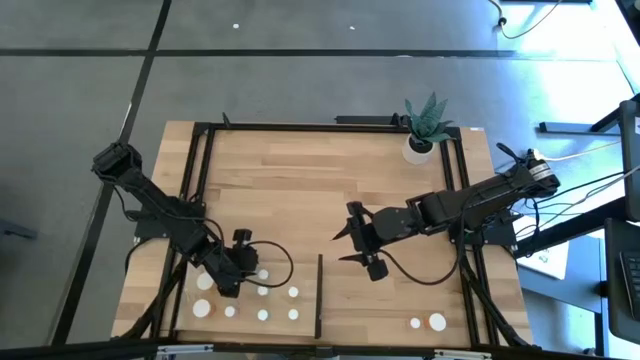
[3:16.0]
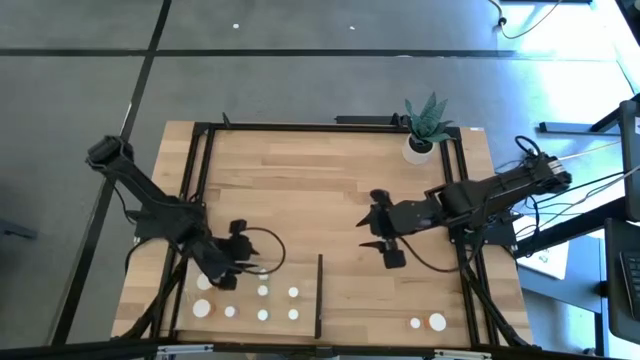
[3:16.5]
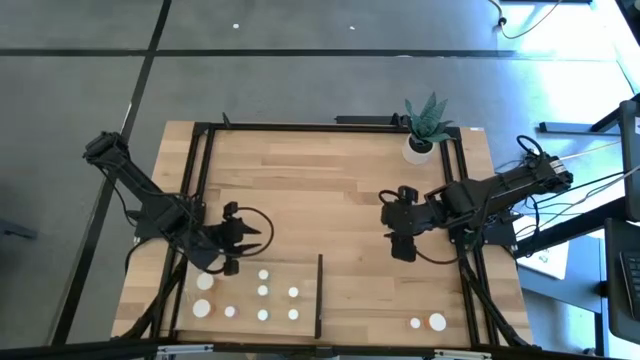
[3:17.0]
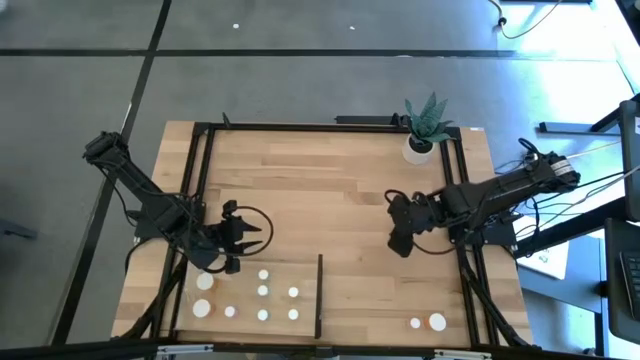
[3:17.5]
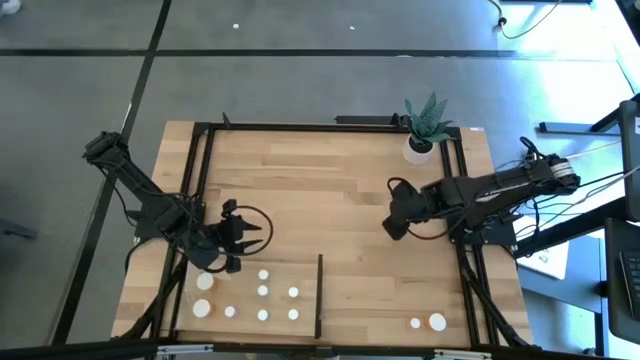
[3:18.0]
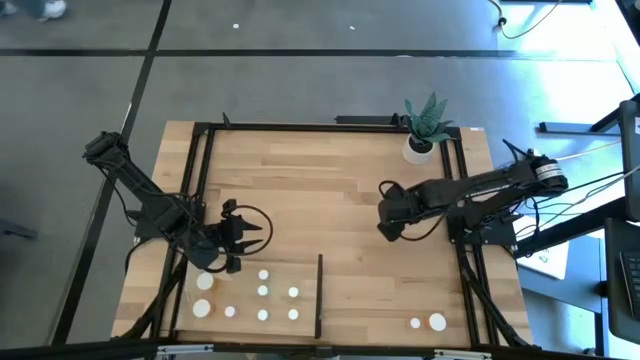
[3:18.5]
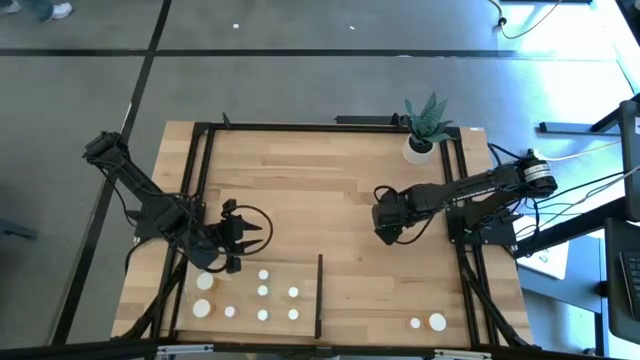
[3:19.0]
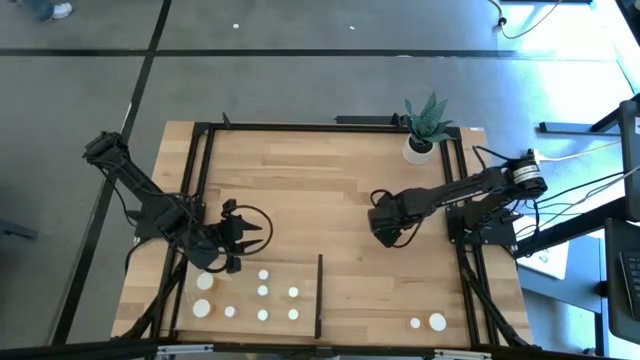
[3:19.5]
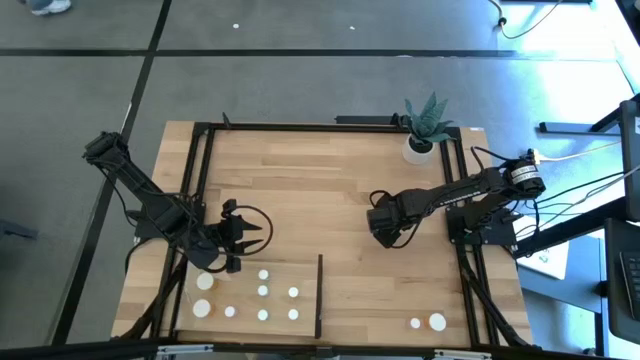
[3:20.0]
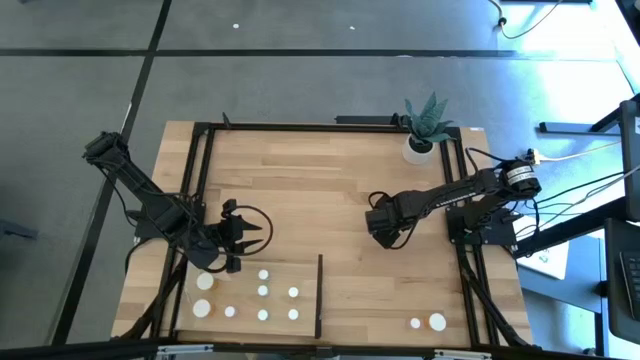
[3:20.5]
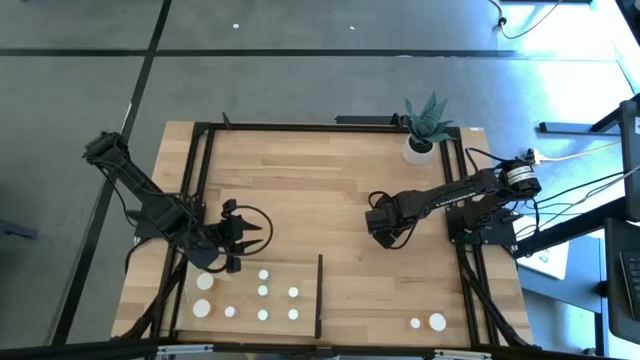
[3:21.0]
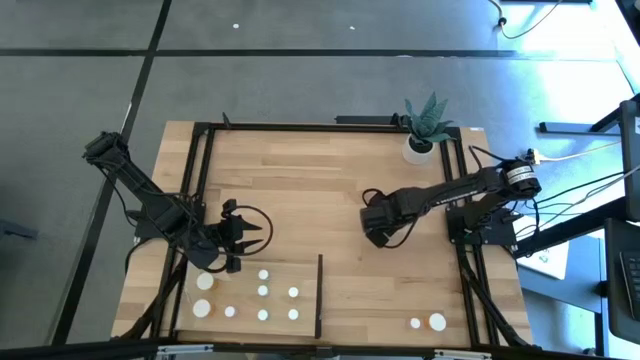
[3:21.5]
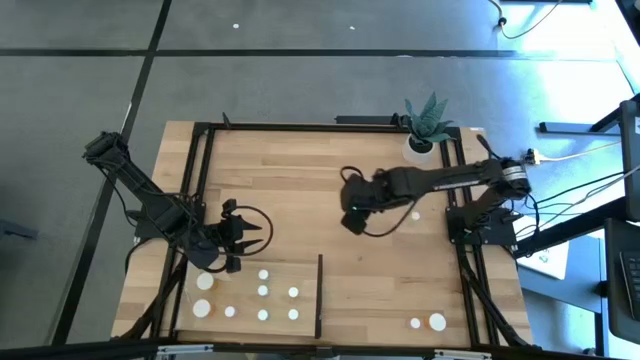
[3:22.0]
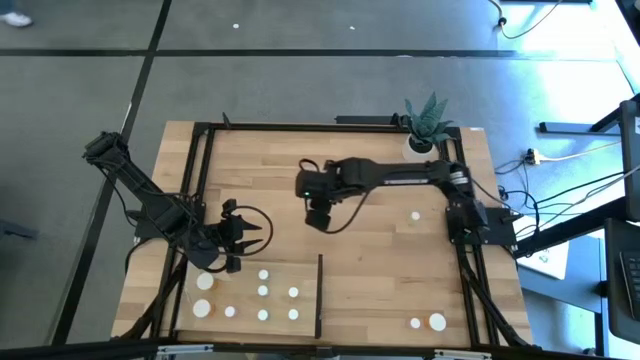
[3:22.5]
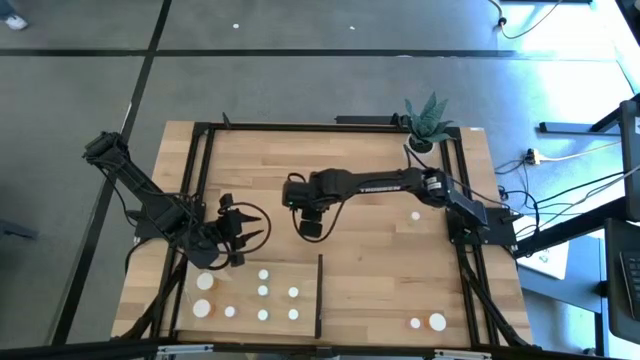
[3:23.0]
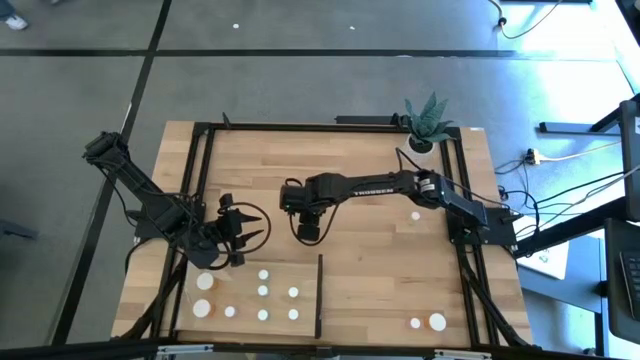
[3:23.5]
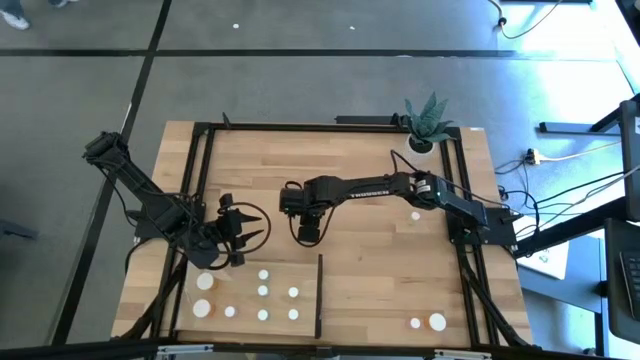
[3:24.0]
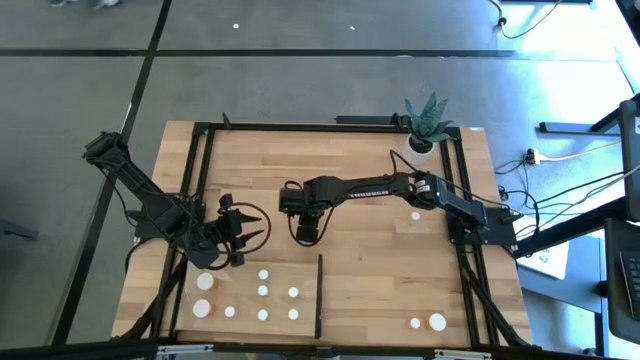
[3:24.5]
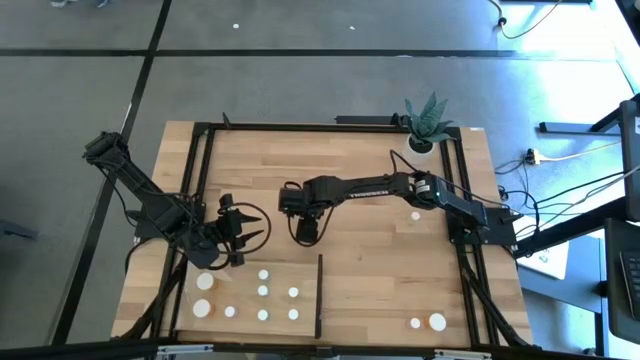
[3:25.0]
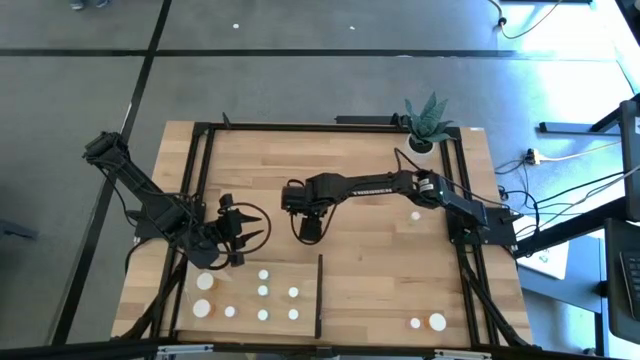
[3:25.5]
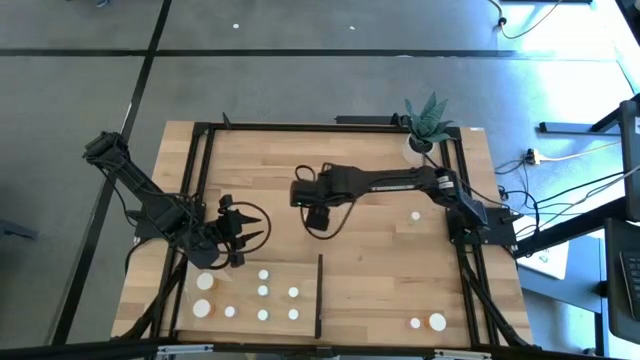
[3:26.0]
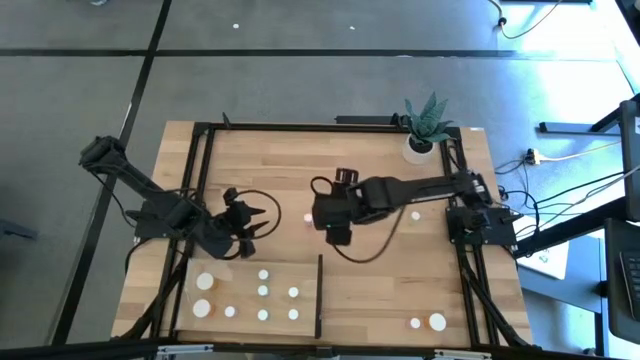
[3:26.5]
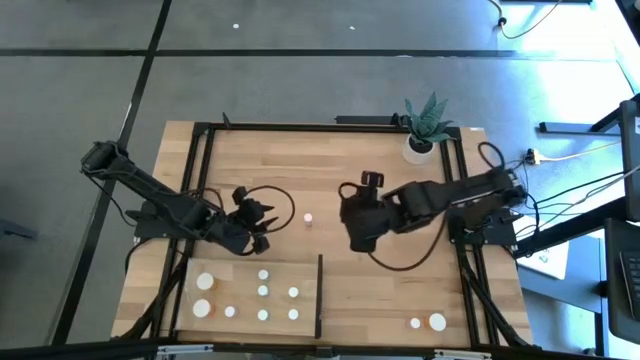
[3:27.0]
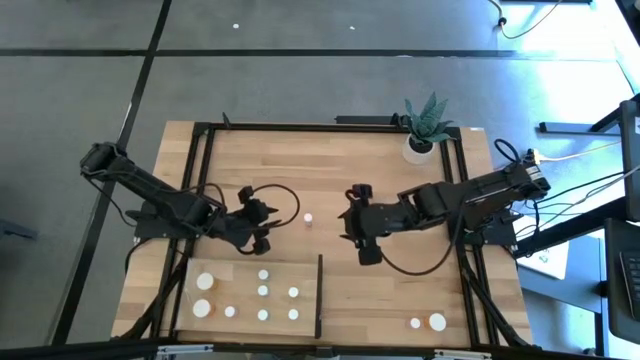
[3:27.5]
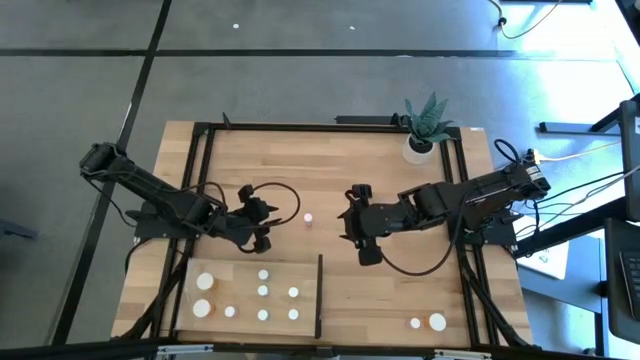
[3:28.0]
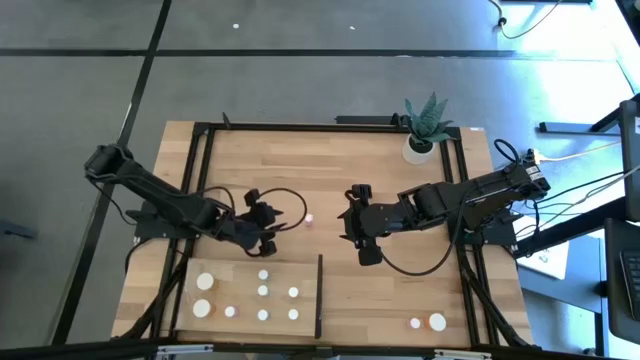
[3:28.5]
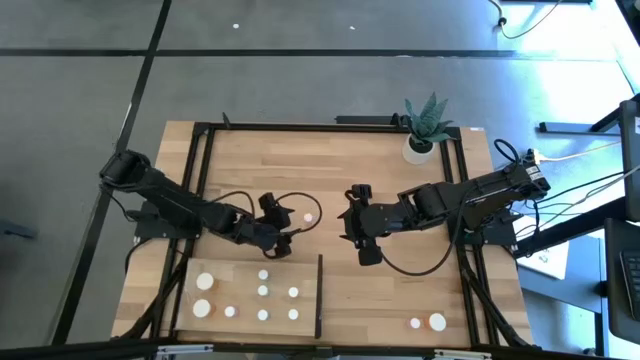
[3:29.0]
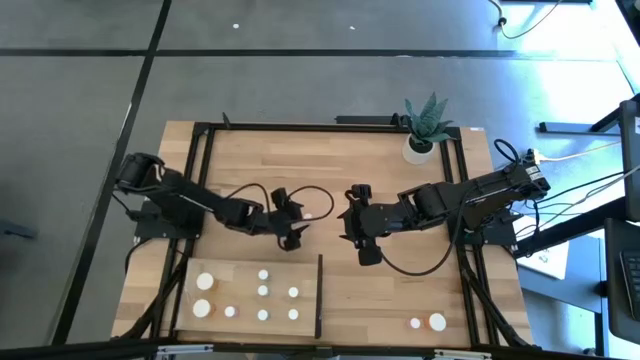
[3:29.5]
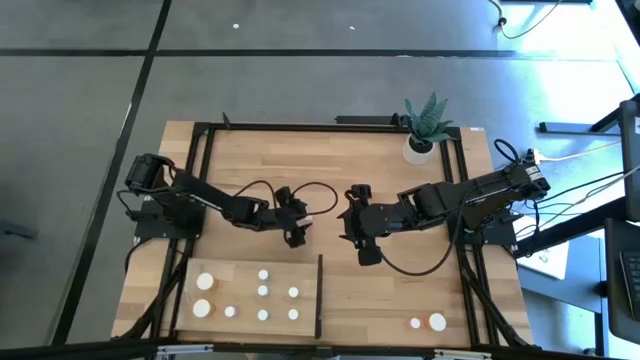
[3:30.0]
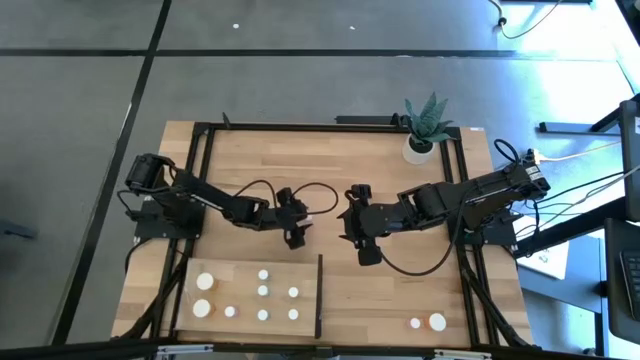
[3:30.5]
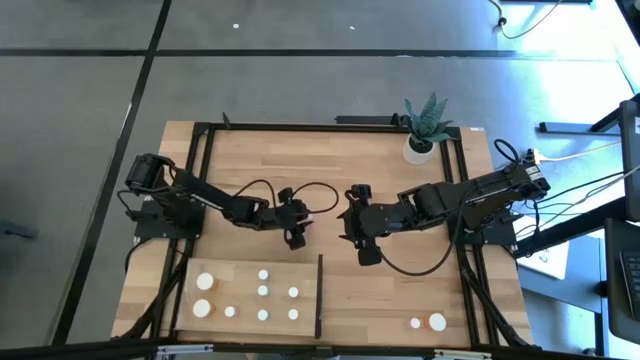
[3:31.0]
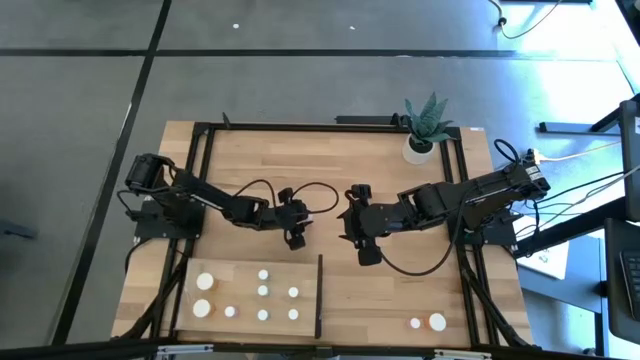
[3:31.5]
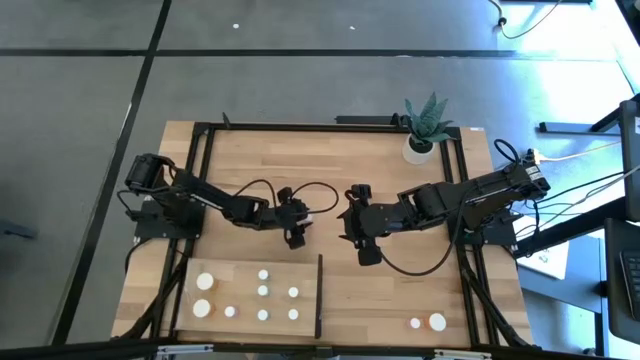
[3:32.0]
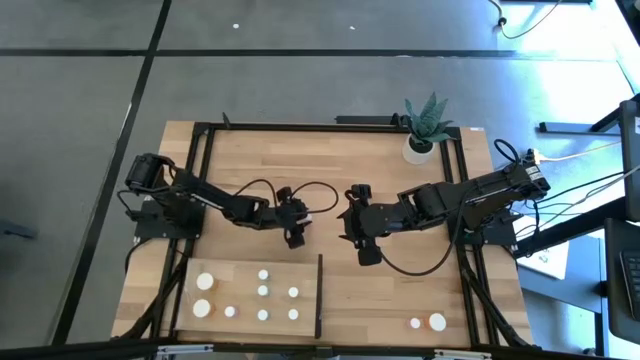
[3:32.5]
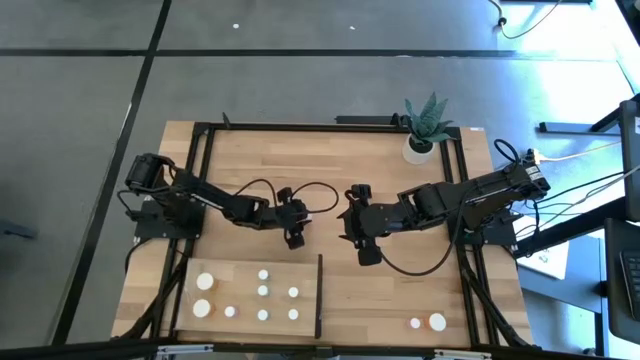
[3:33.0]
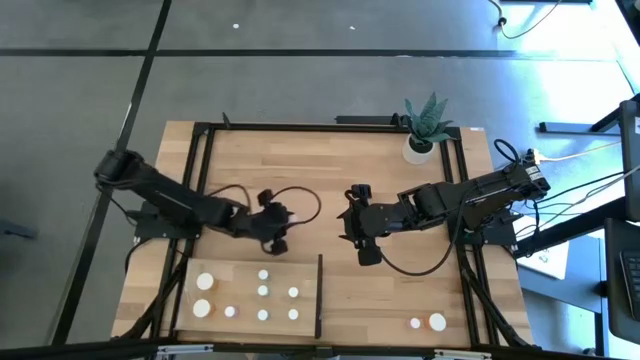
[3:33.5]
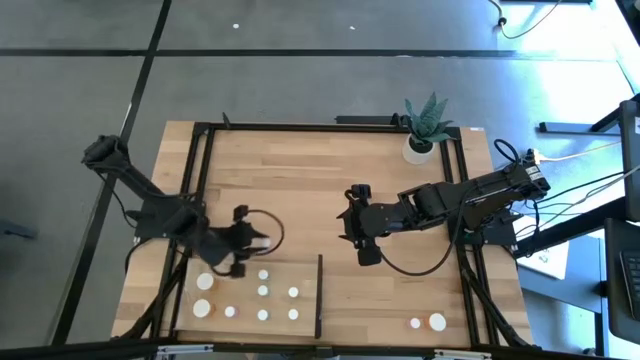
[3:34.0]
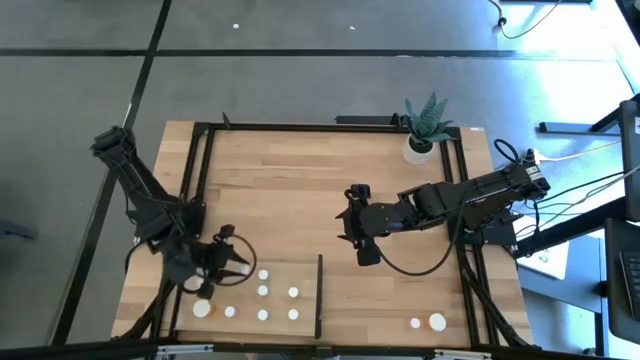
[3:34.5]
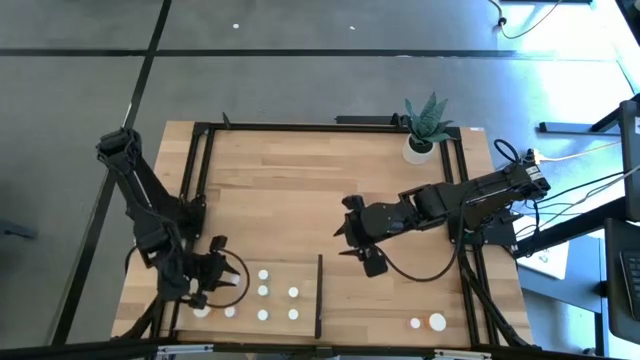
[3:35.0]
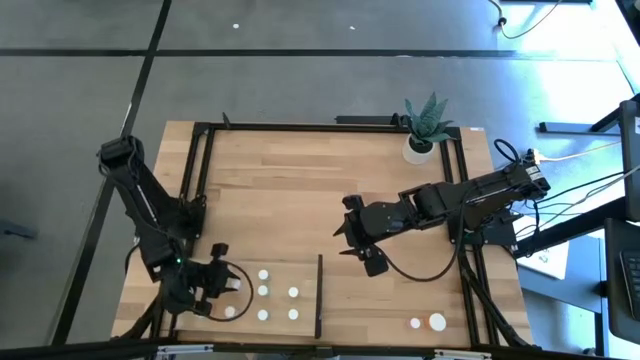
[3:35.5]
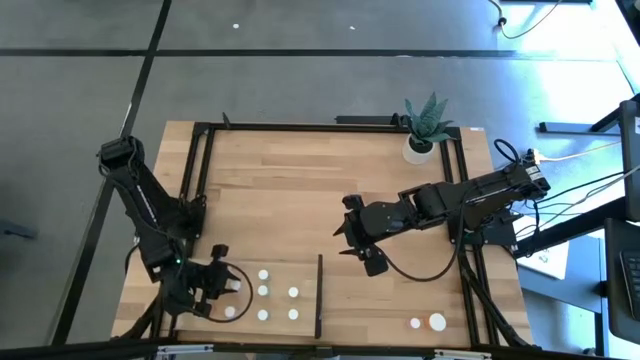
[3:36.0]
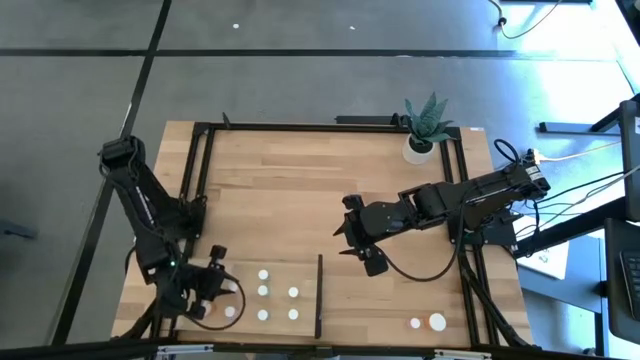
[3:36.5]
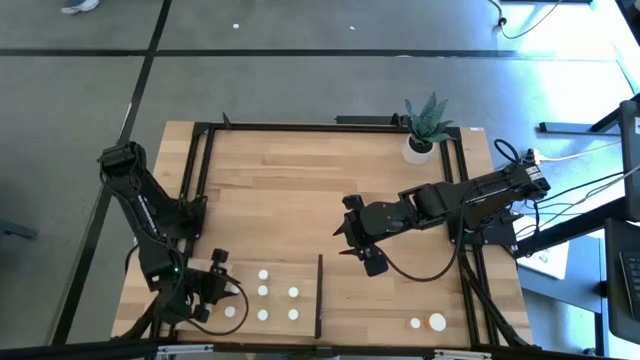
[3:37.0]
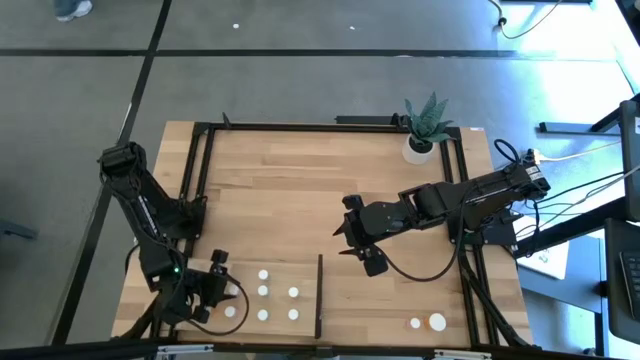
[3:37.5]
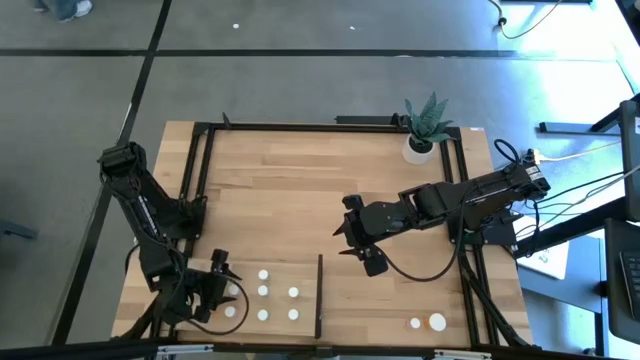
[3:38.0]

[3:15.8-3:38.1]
Task: Pick and place medicine bottles onto shelf by color
Put the top pink pill bottle on the shelf aligned with the other pink pill bottle
